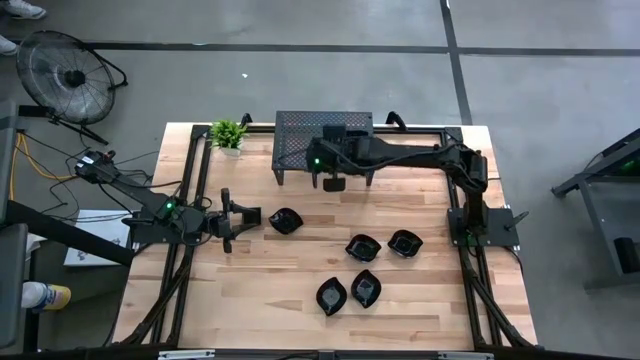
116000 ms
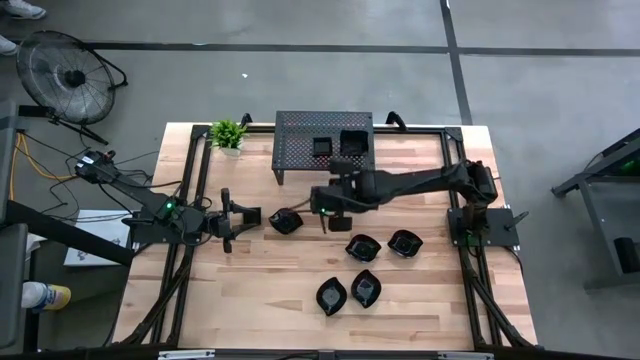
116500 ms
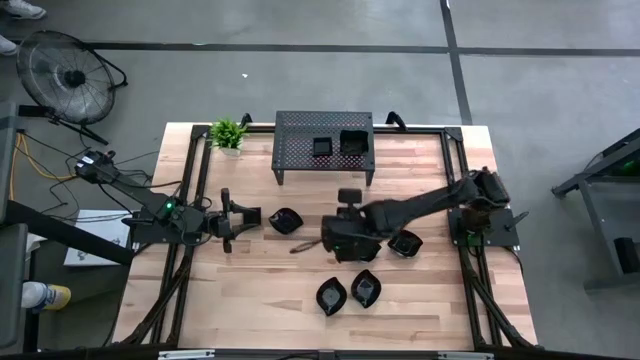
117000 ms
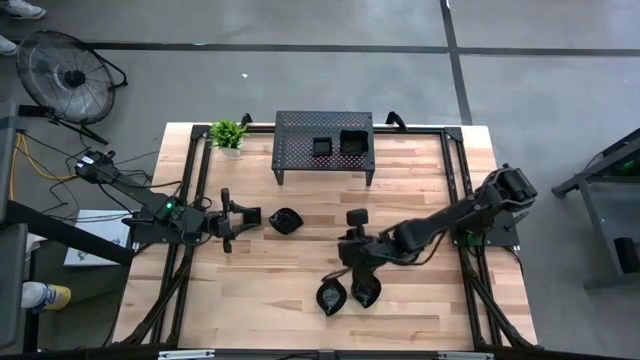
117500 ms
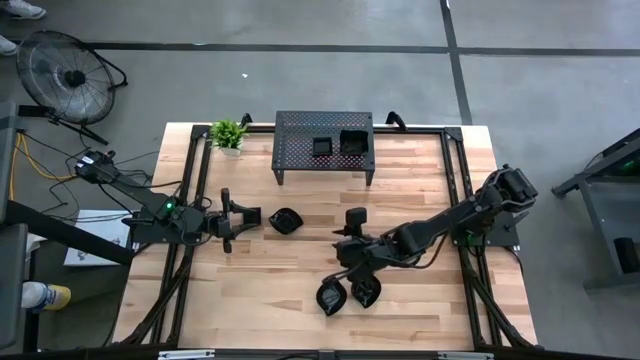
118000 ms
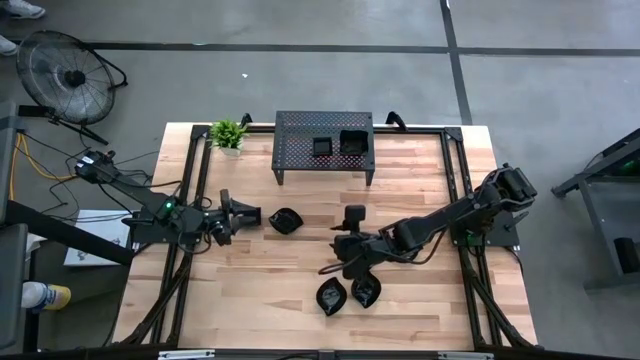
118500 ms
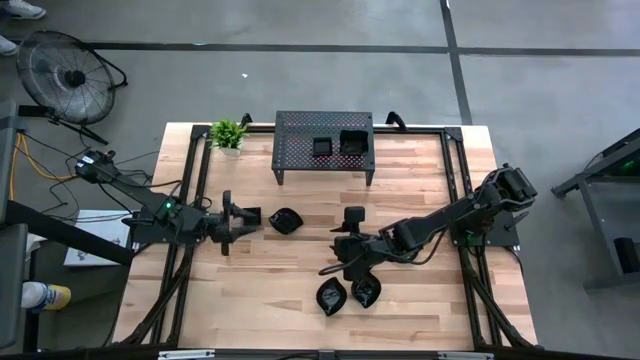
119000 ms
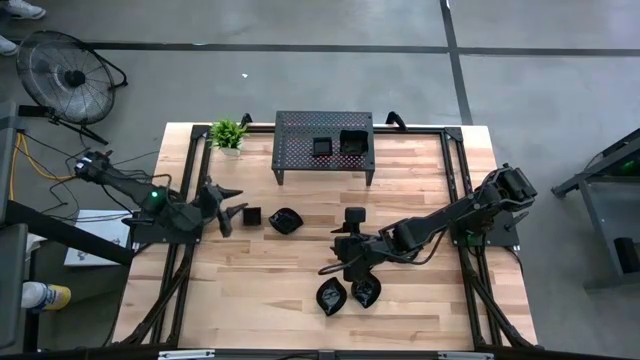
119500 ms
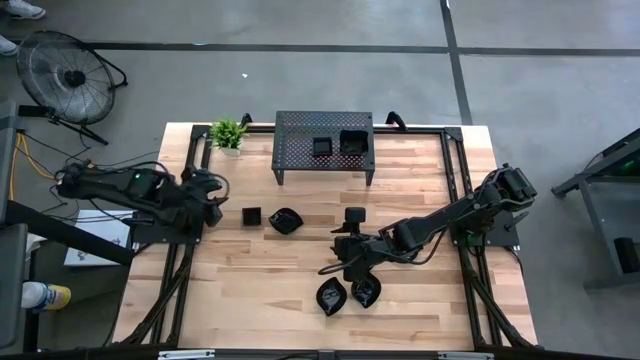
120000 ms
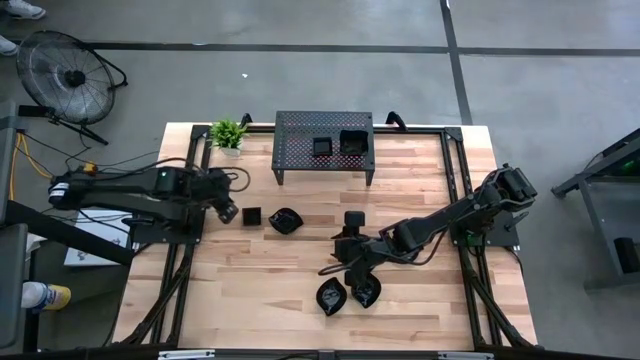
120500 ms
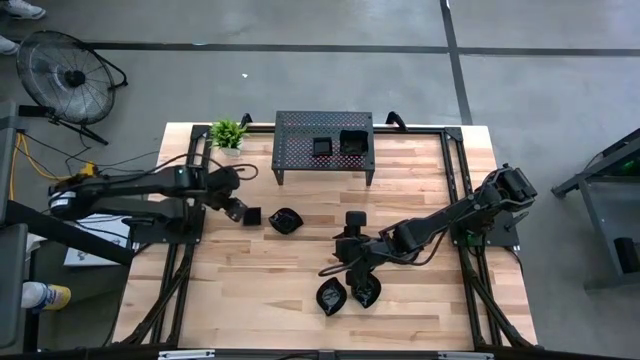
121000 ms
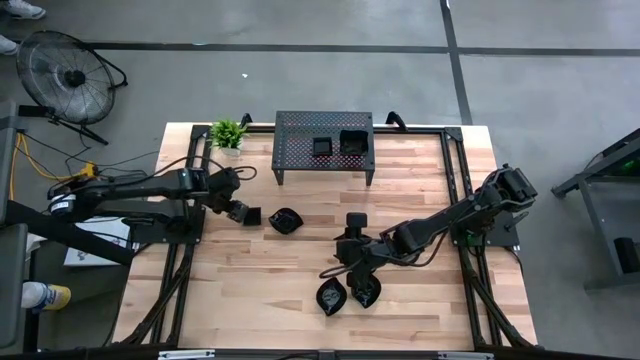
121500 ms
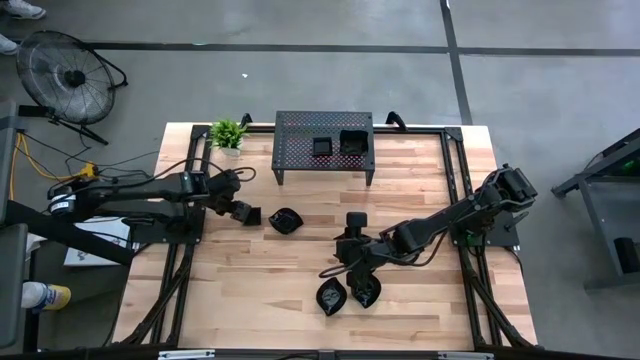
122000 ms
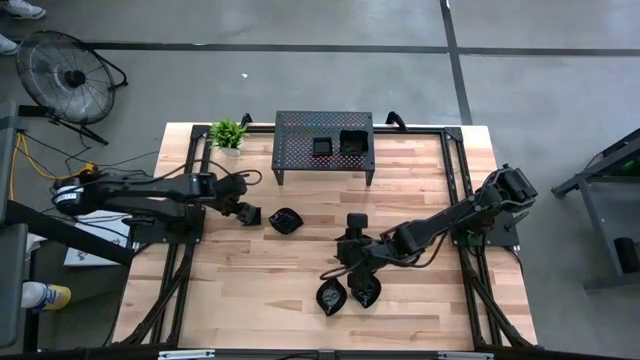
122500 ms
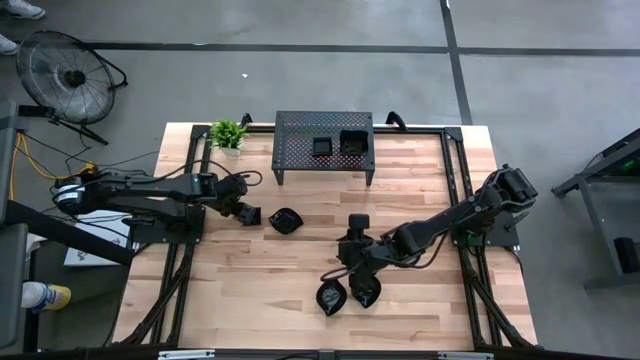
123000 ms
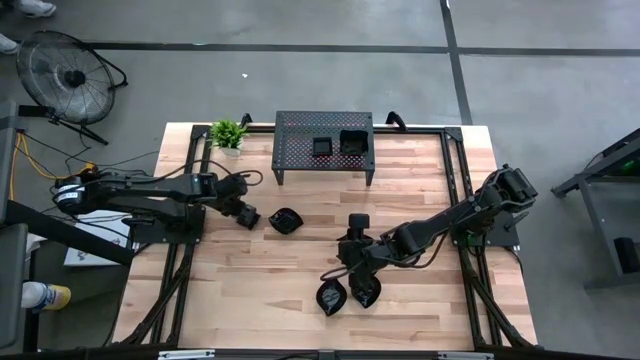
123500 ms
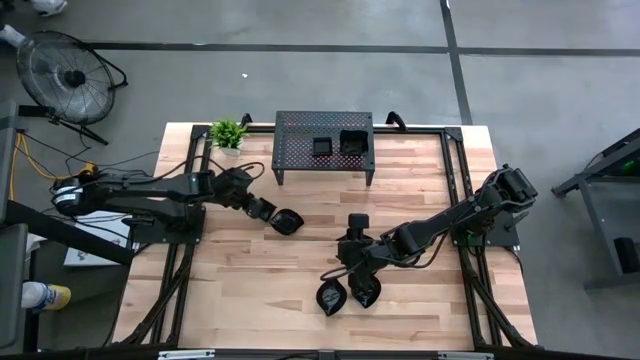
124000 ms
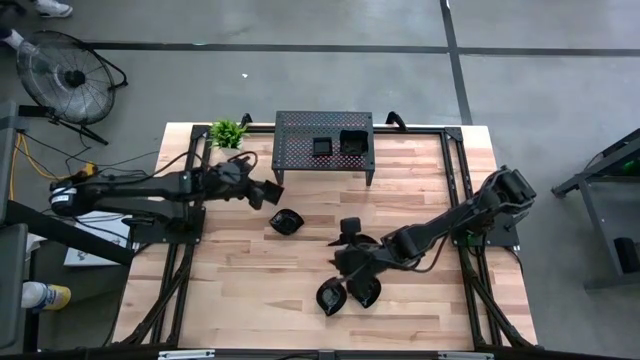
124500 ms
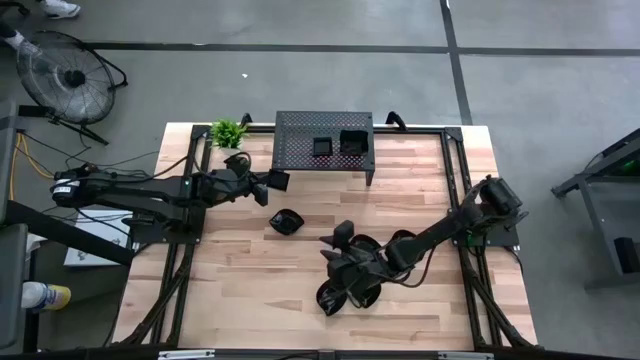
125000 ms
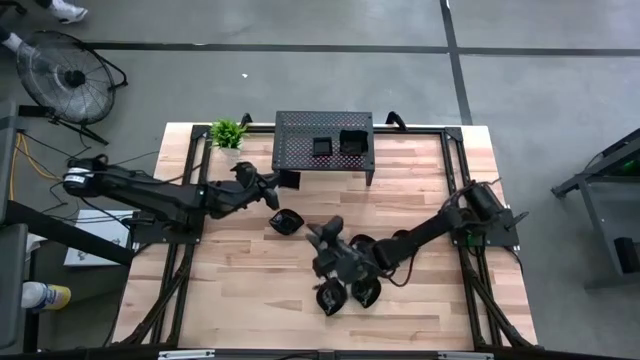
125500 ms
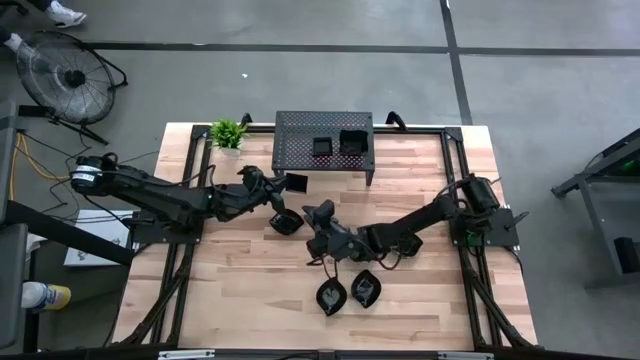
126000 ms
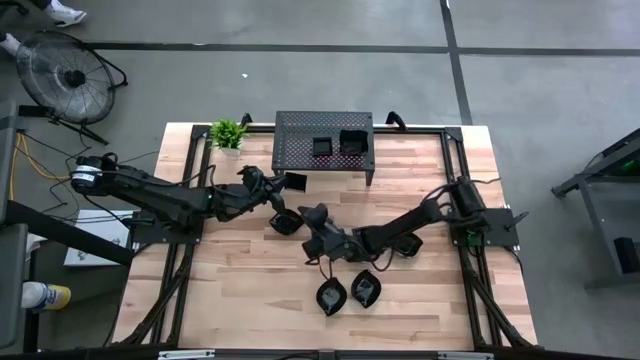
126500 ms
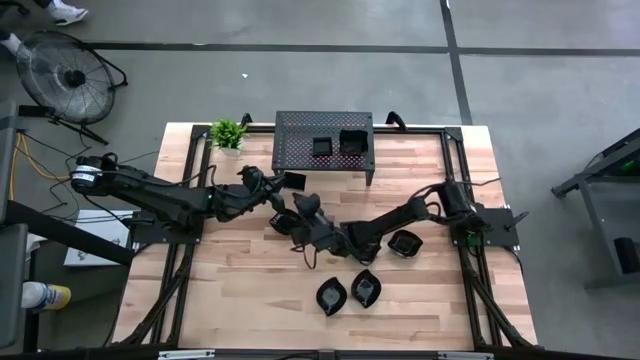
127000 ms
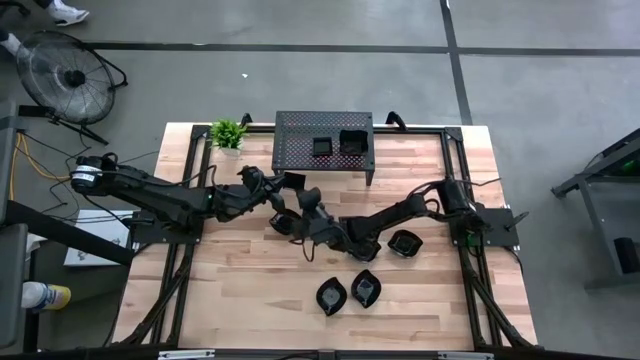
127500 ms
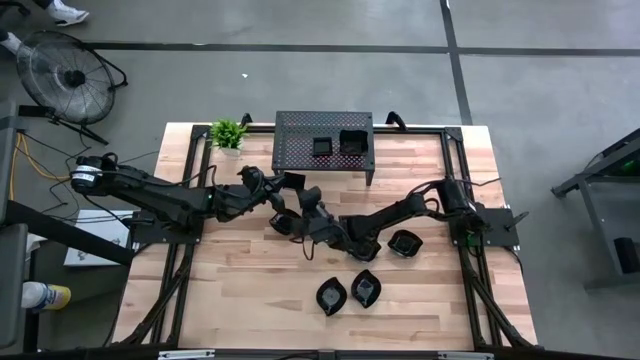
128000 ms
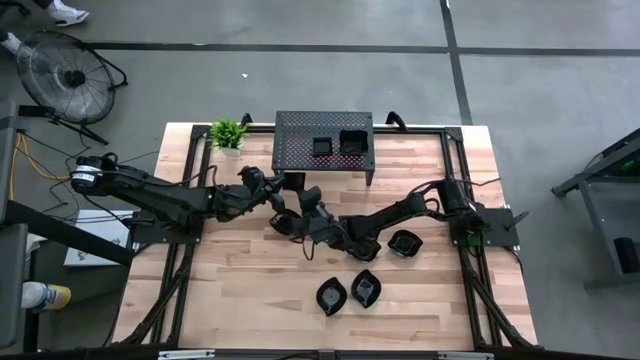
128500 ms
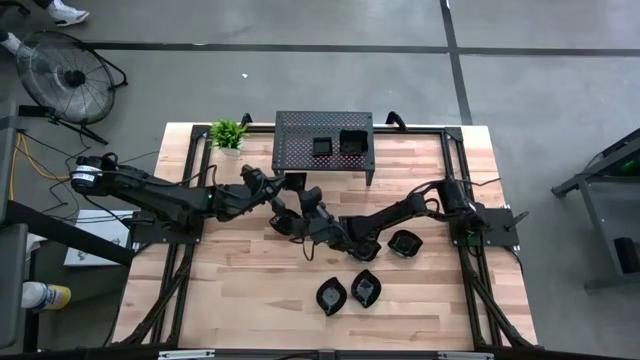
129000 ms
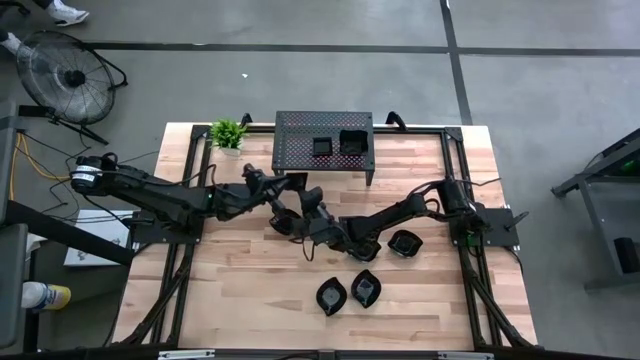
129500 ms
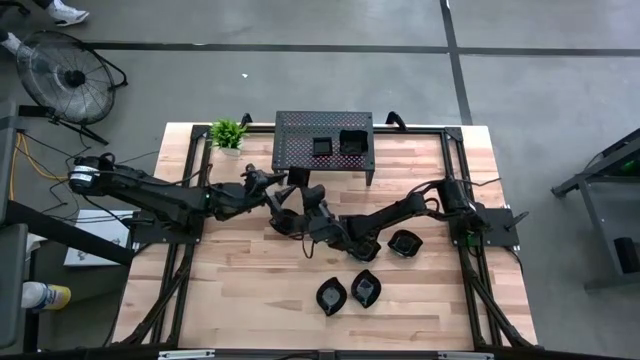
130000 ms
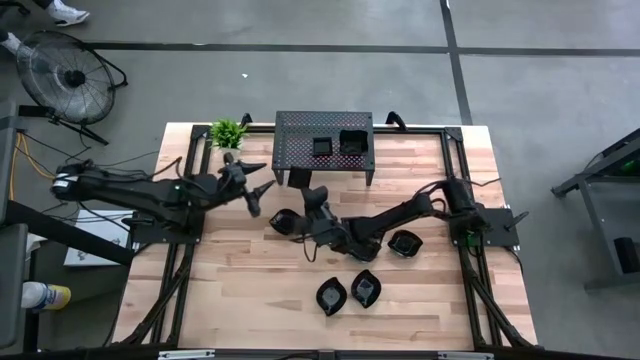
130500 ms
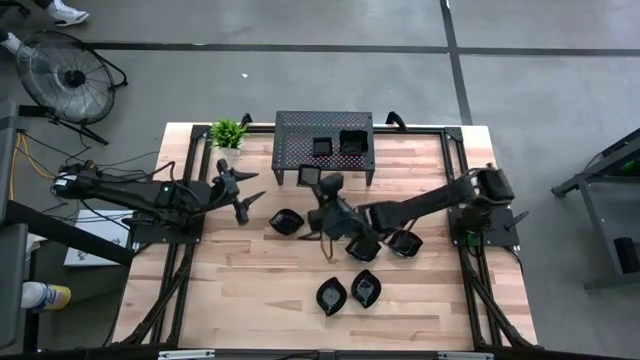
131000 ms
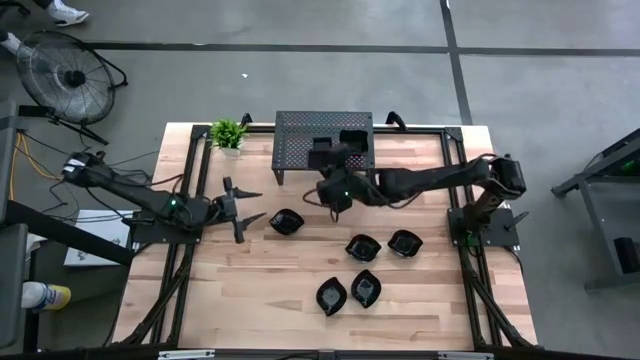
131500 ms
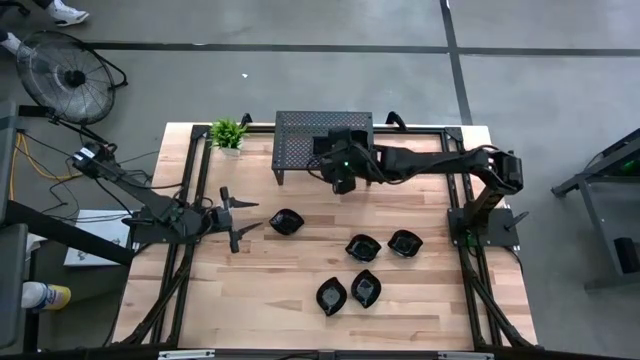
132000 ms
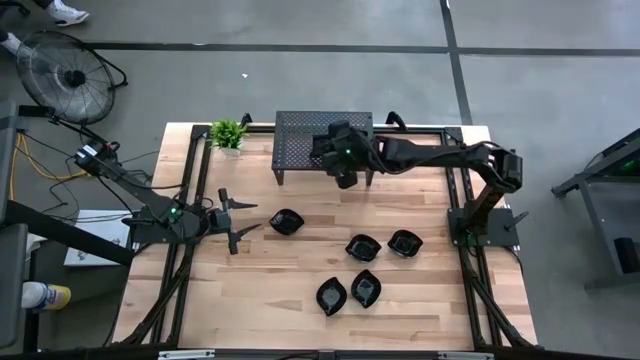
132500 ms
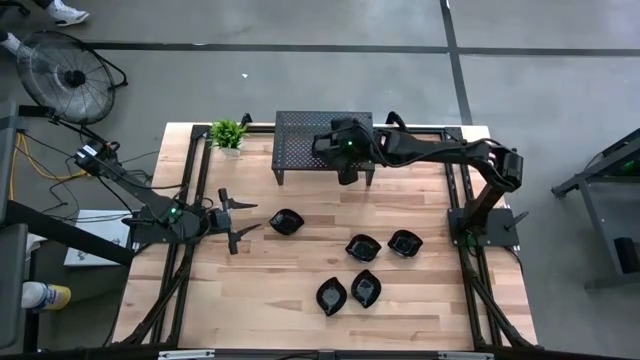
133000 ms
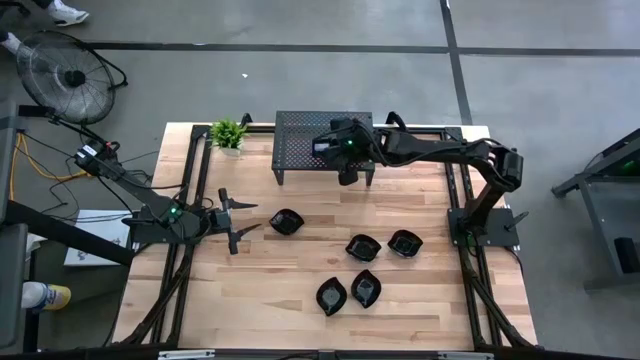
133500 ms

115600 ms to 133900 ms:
Task: Pick & Place Mini shaped plates
Stack the square plate on top of the square plate on the shelf

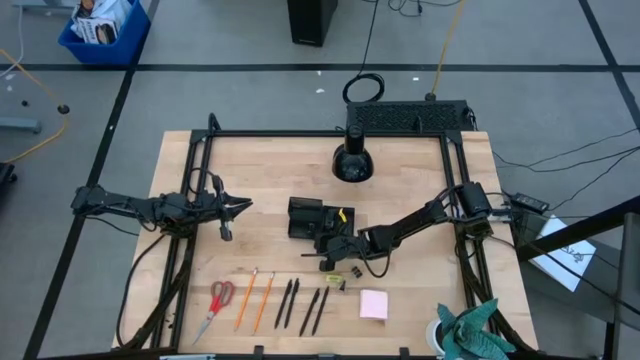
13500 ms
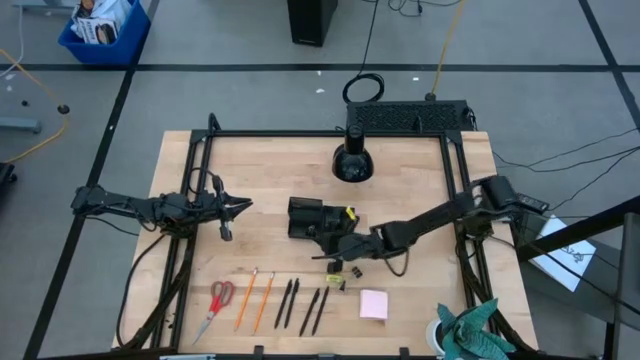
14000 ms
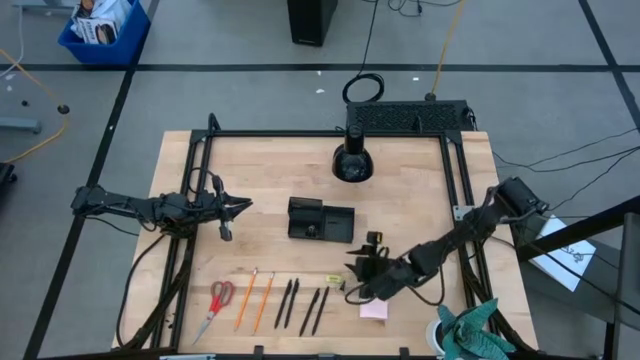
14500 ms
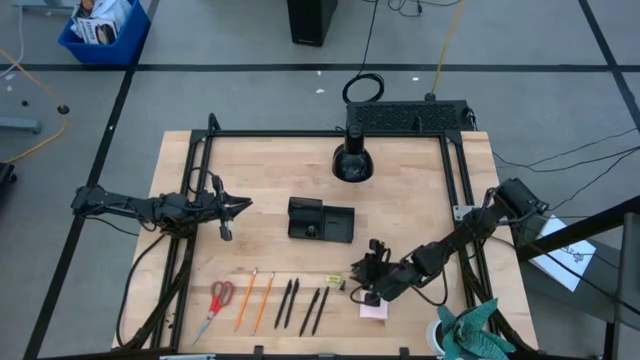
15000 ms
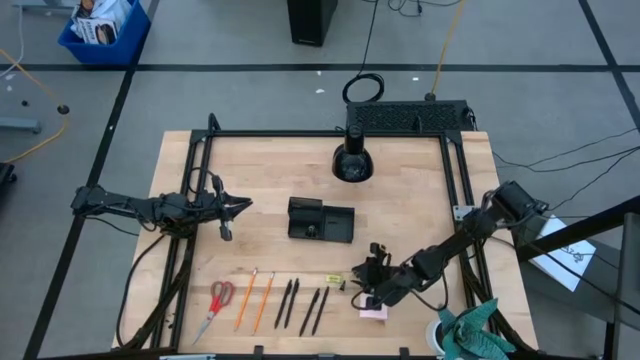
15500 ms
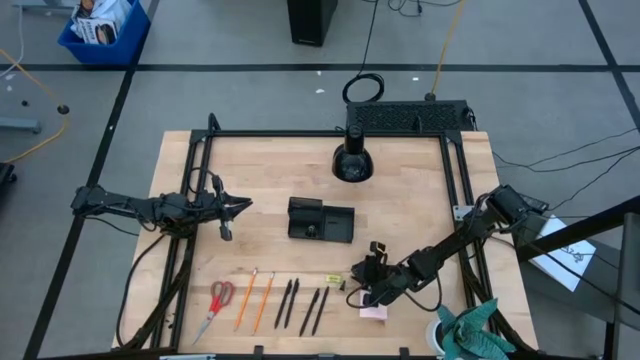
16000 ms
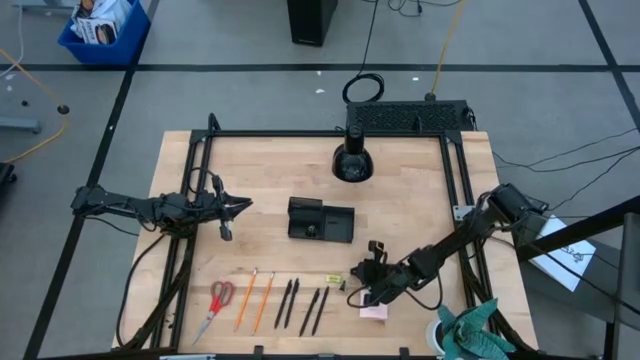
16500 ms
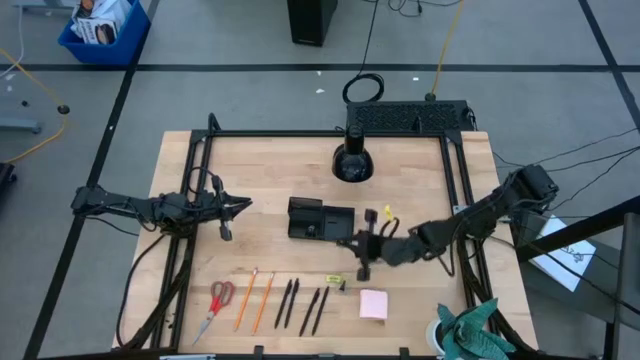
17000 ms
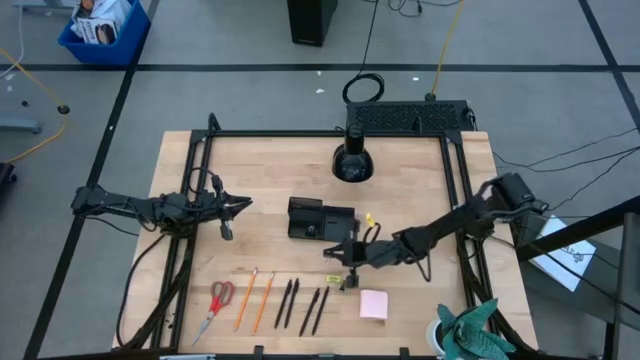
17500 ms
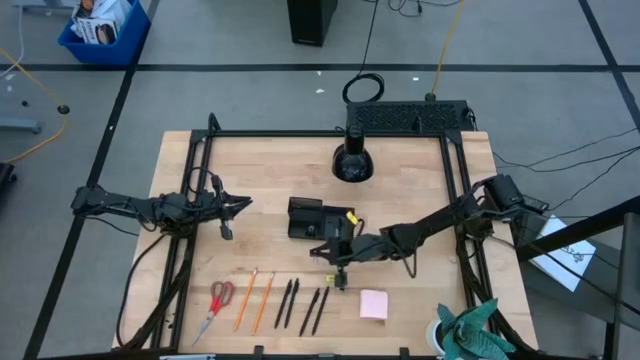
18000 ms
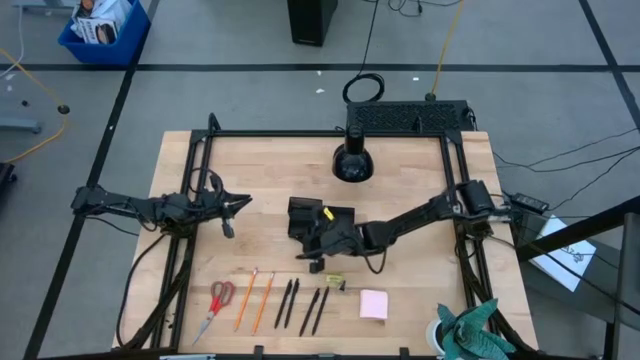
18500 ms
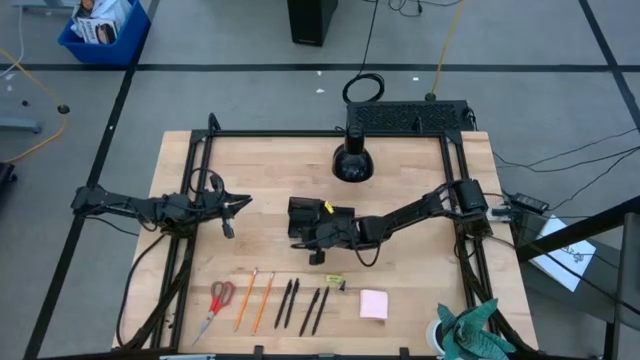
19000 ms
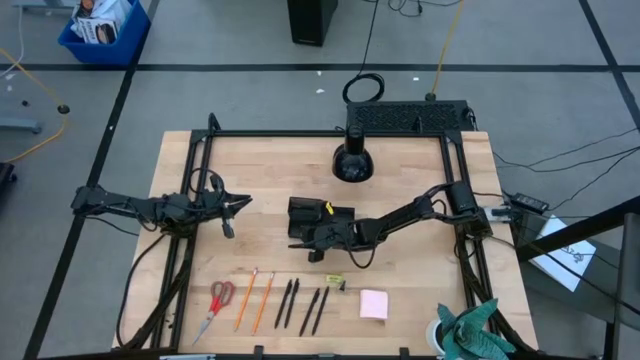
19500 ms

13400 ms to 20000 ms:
Task: Pick and place office supplies into organizer
Put the right binder clip into the desk organizer
